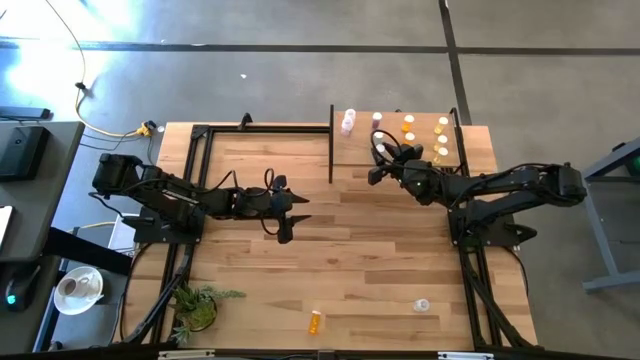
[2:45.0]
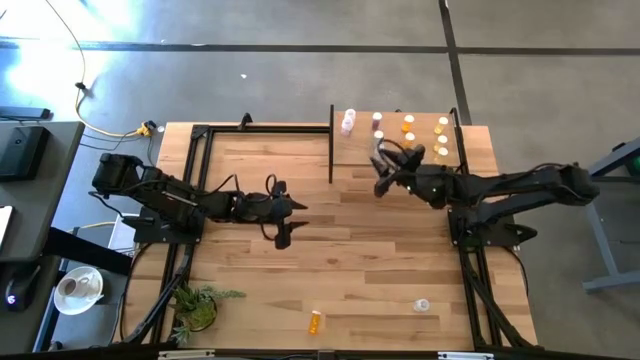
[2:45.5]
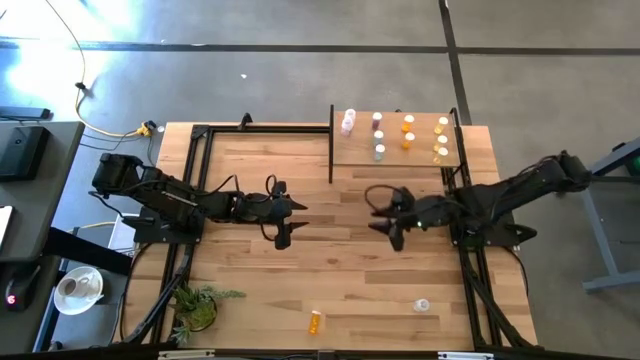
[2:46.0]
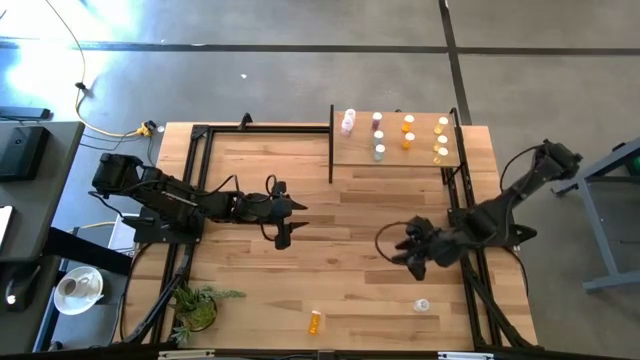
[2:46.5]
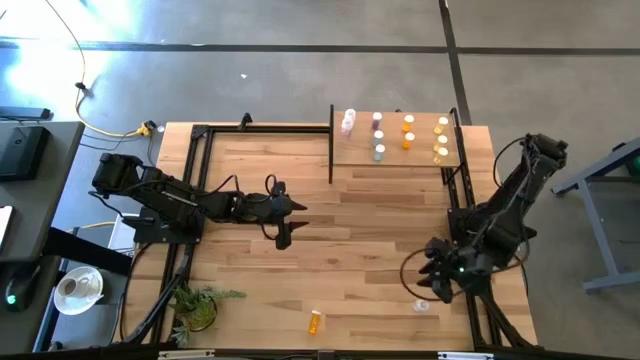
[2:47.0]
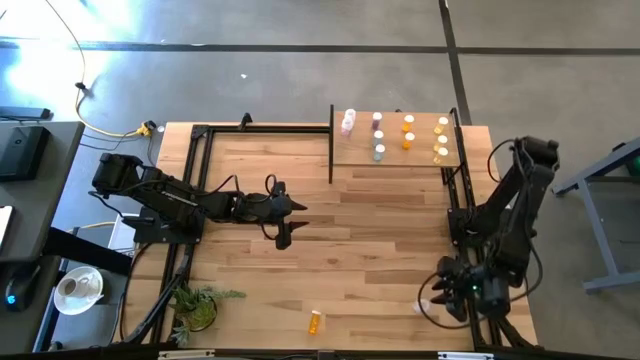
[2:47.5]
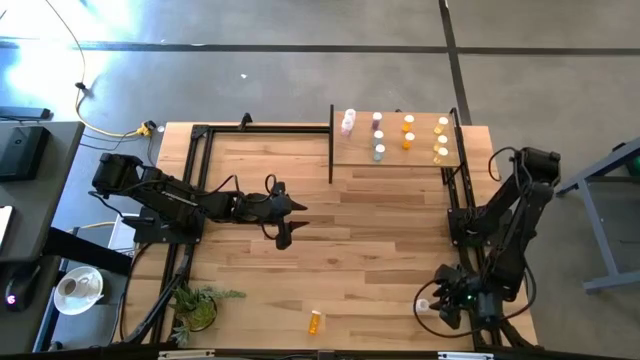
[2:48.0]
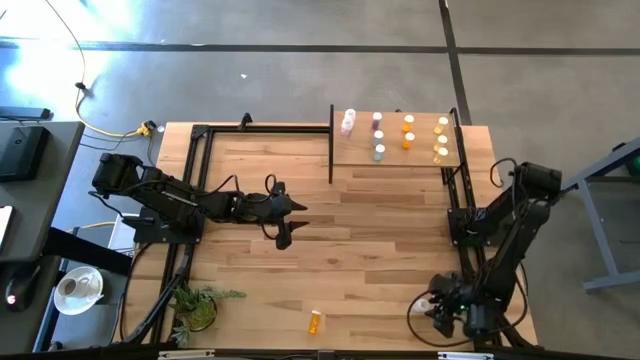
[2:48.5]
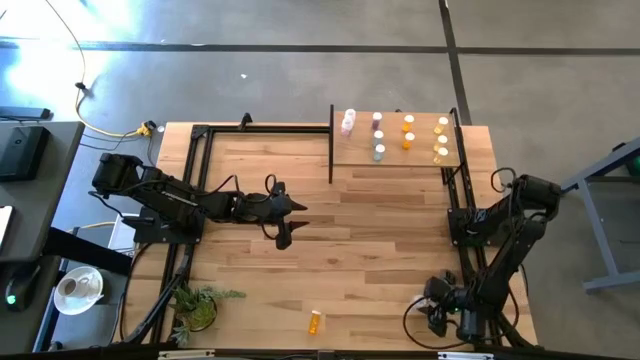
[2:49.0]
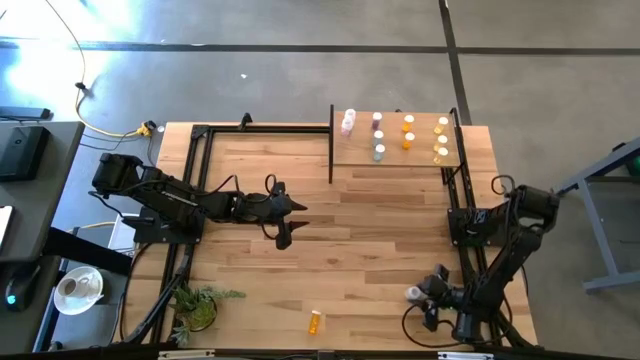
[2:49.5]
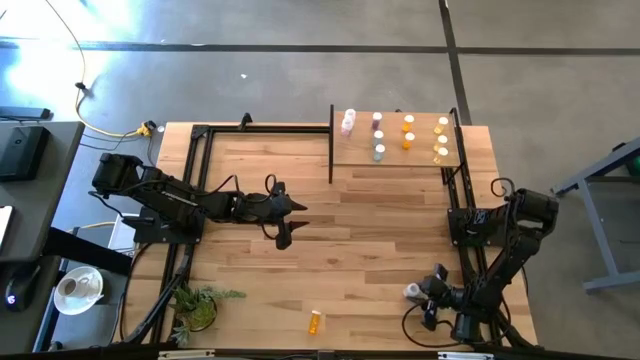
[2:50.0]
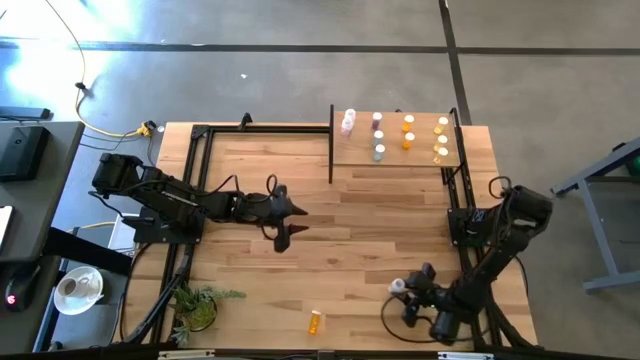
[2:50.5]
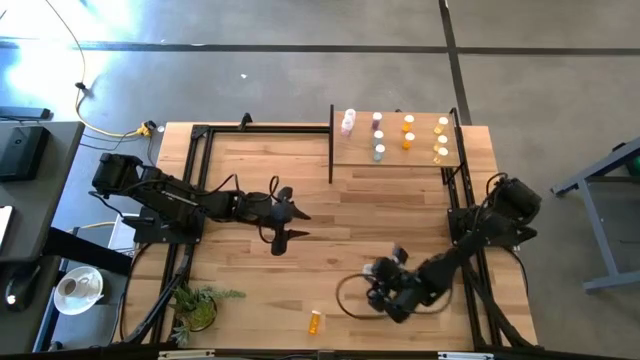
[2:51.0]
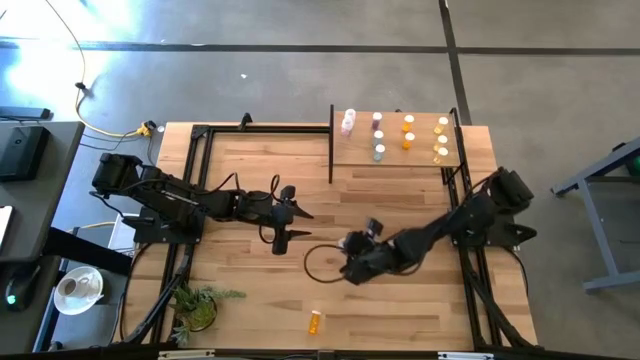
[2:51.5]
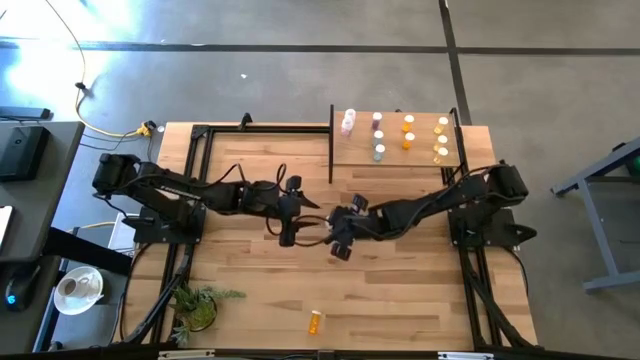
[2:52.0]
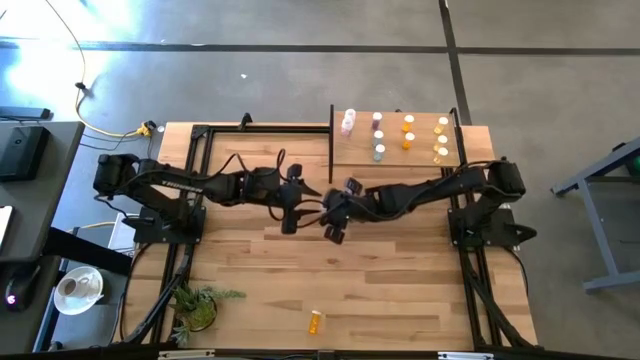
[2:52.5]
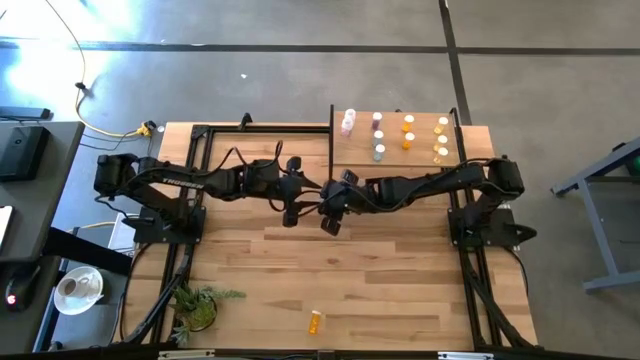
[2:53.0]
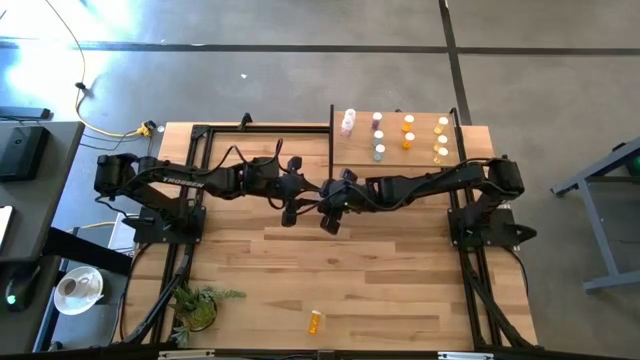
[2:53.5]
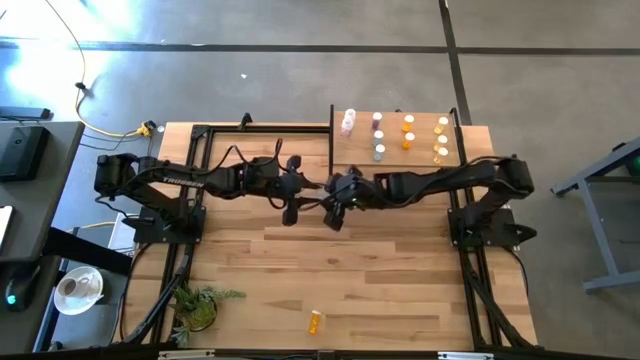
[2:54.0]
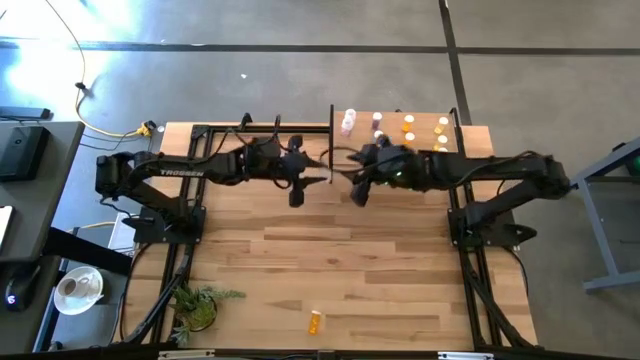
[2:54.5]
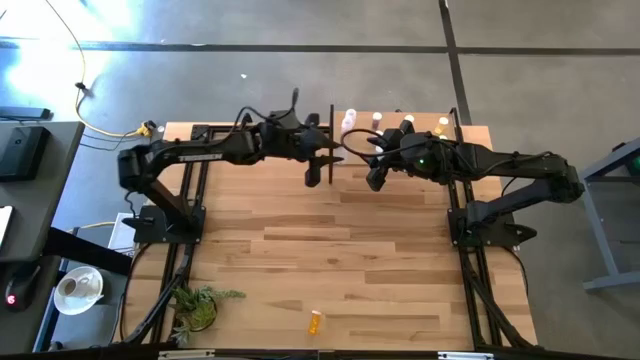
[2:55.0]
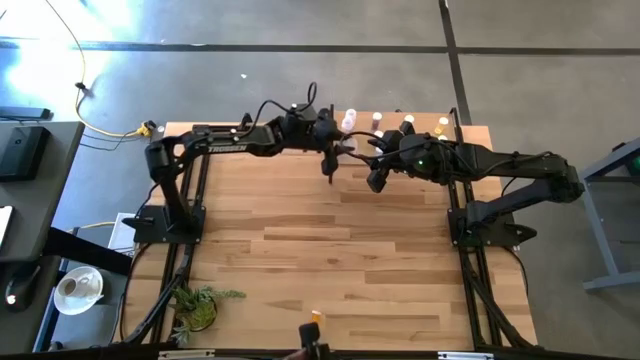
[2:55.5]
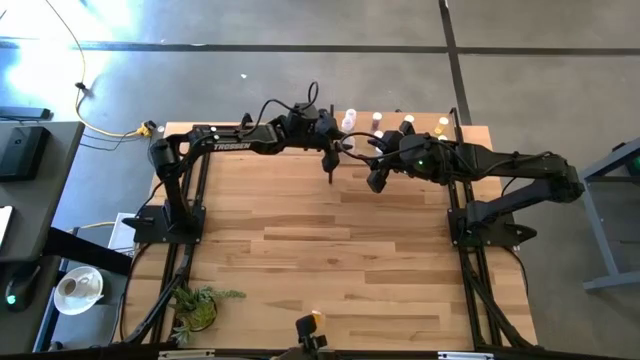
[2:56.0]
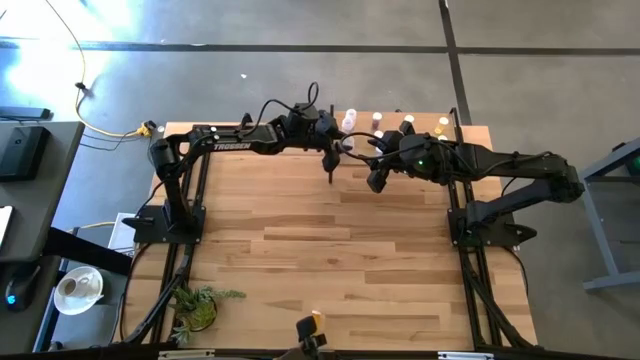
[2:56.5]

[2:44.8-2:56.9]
Task: Pick and place medicine bottles onto shelf by color
Put the transparent pill bottle on the shelf aligned with the other transparent pill bottles

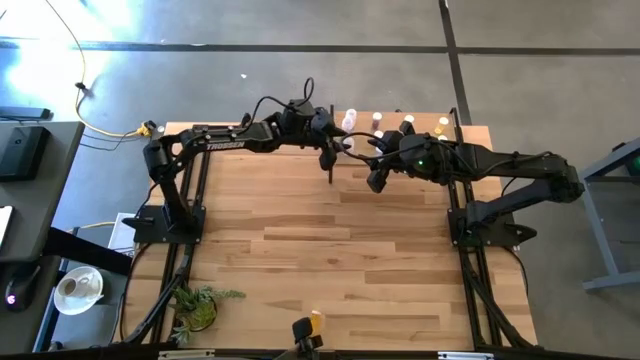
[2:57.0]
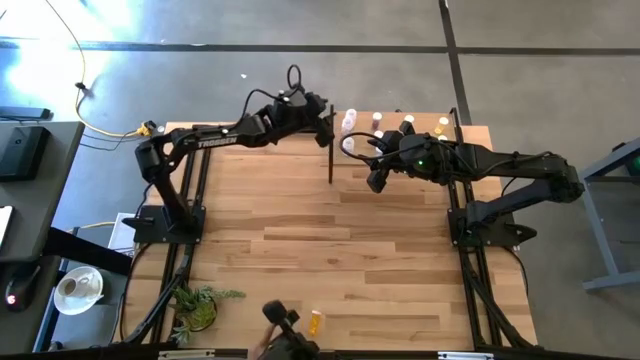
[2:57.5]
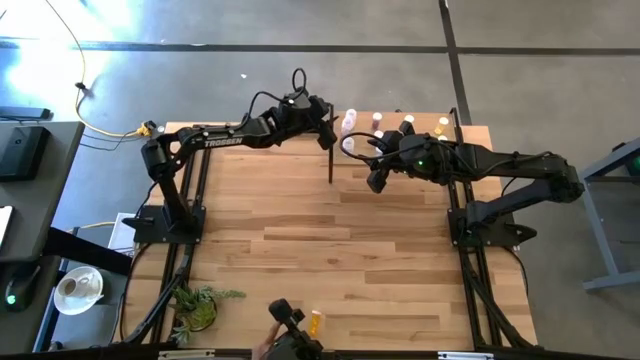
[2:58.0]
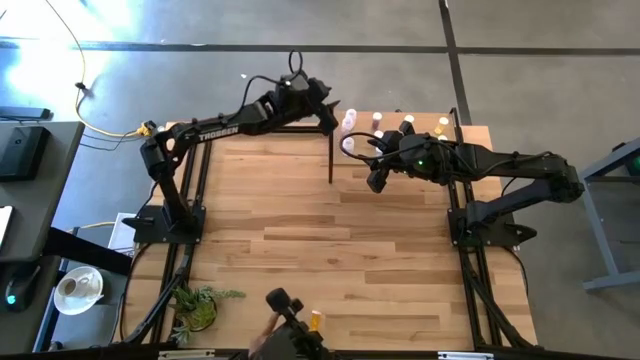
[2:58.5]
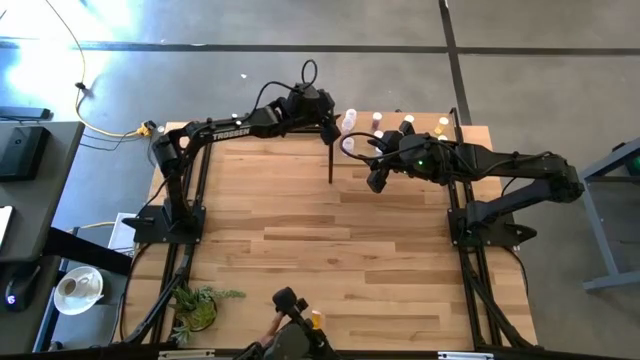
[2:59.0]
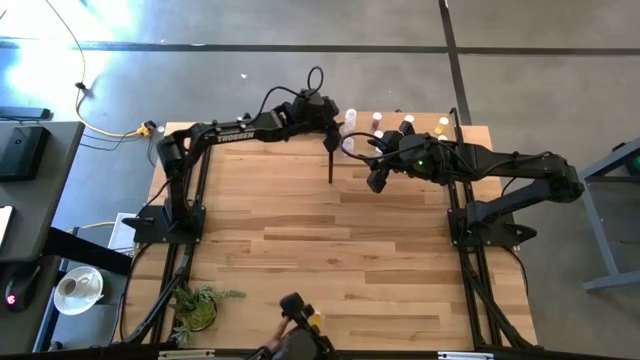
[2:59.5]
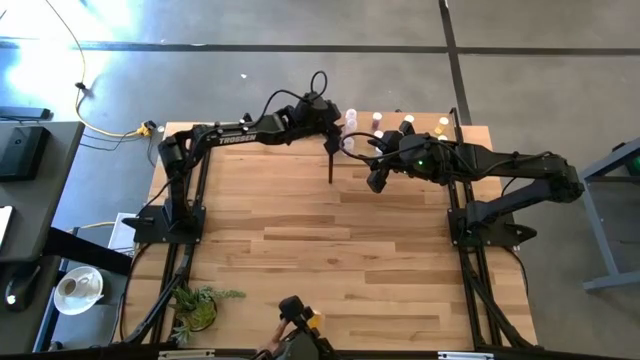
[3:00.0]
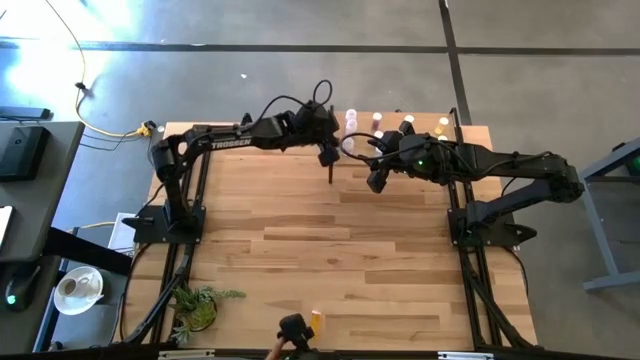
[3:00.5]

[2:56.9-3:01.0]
Adjust the transparent pill bottles on the shelf

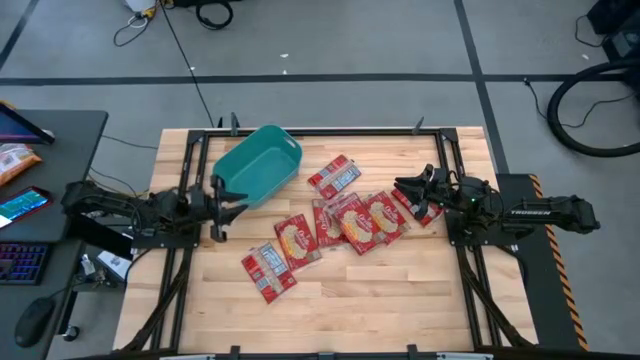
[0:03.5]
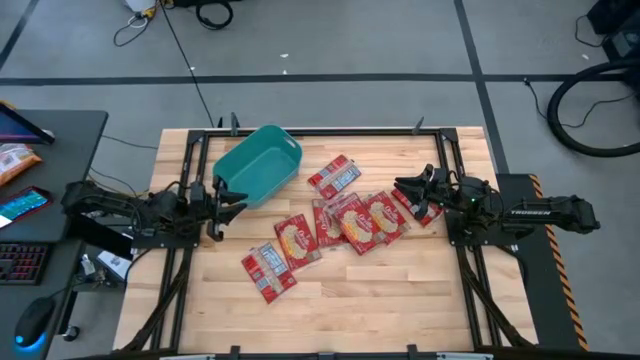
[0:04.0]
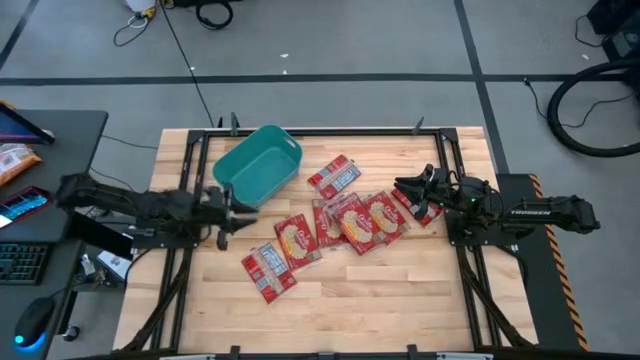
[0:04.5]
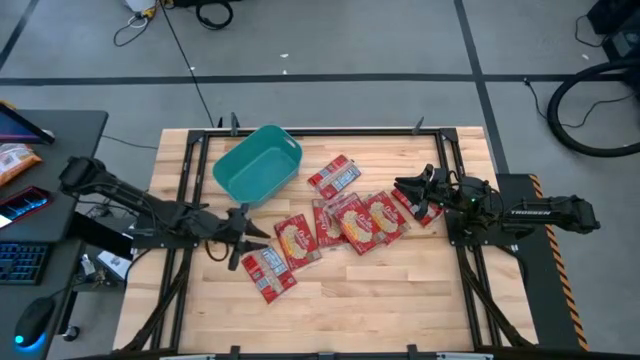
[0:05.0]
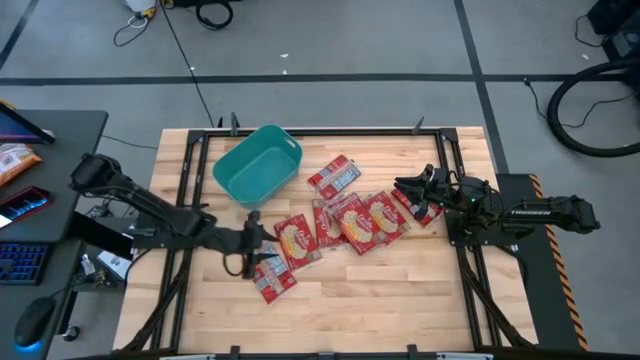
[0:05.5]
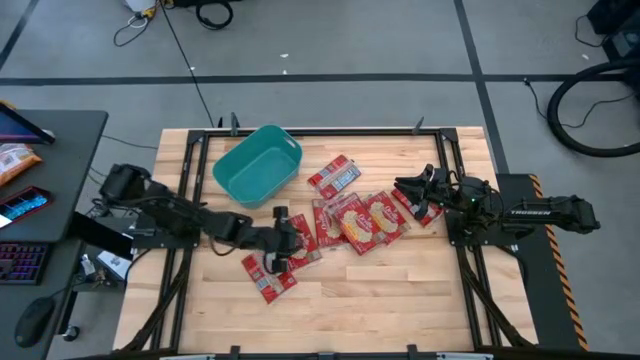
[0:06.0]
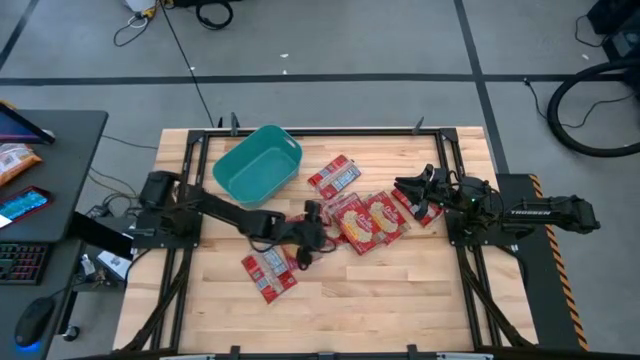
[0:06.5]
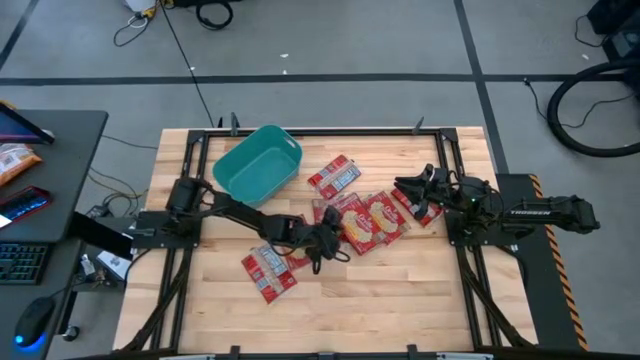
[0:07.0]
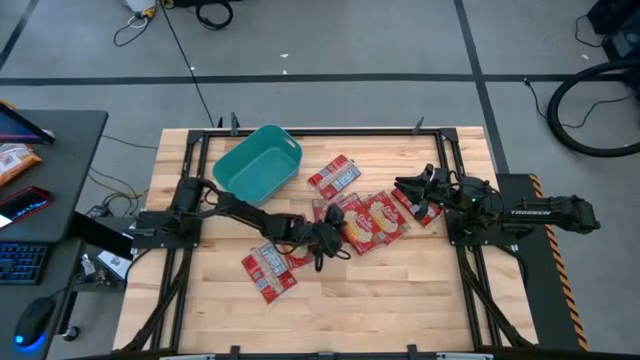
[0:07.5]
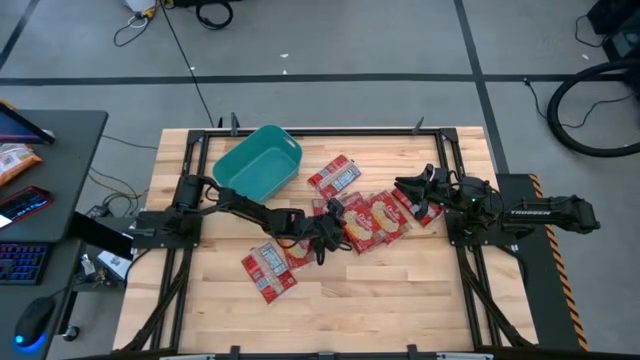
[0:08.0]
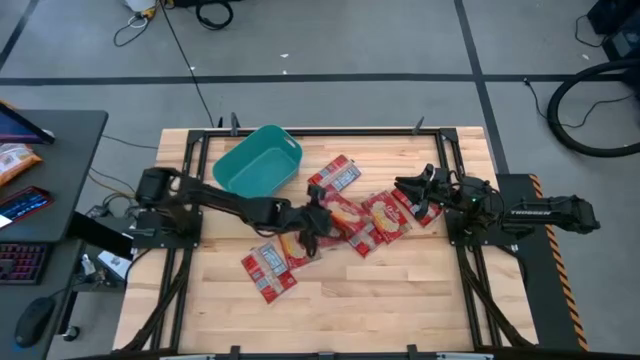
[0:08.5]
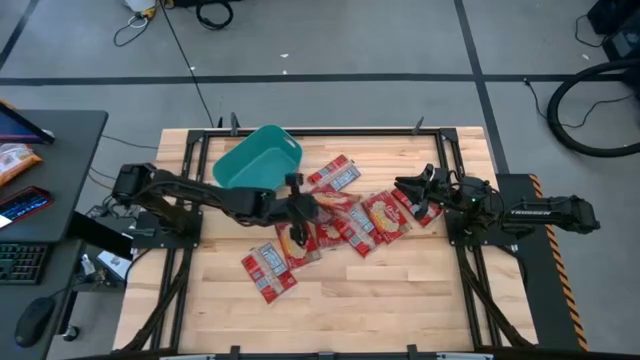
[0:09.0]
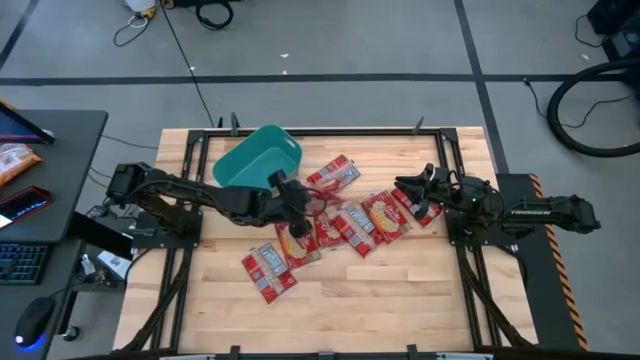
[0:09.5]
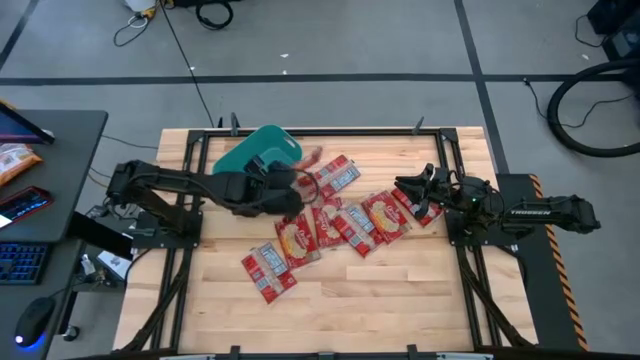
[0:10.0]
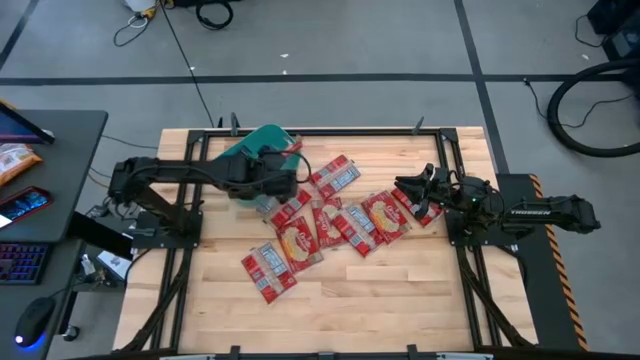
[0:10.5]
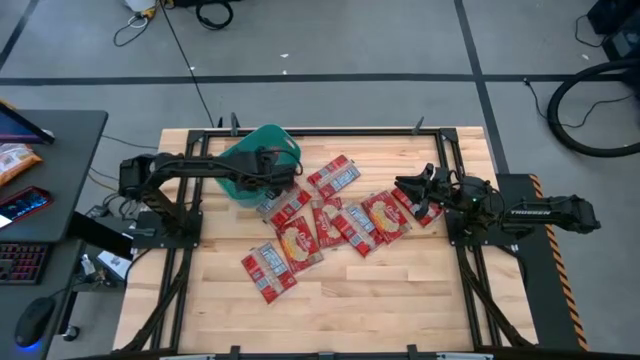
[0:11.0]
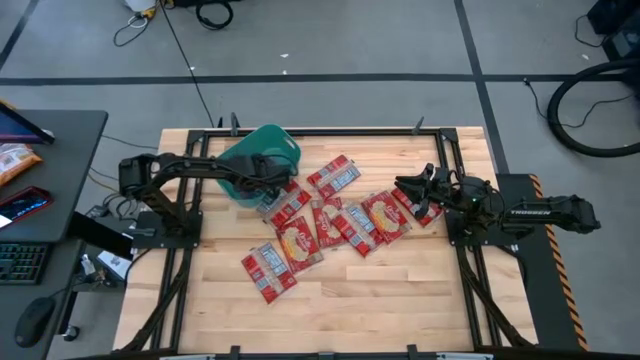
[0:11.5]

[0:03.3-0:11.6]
Task: Sort popcorn bags into baskets
Put the popcorn bag into the green bin
